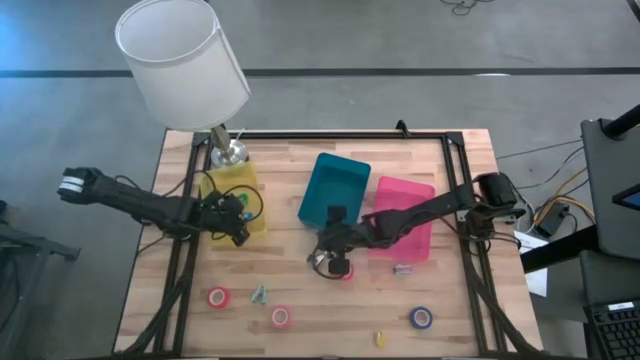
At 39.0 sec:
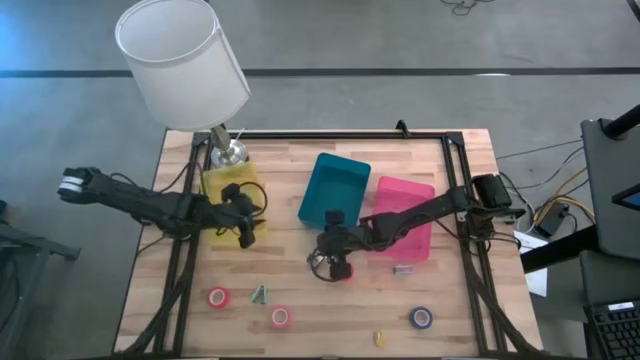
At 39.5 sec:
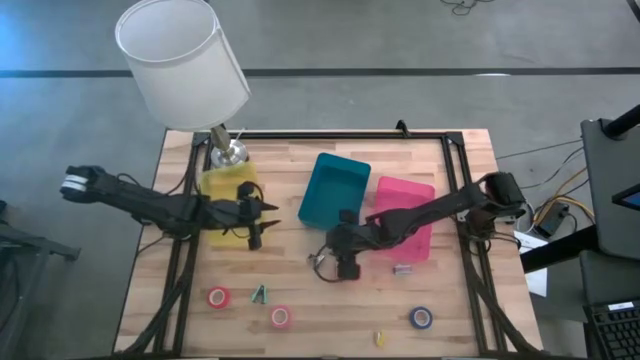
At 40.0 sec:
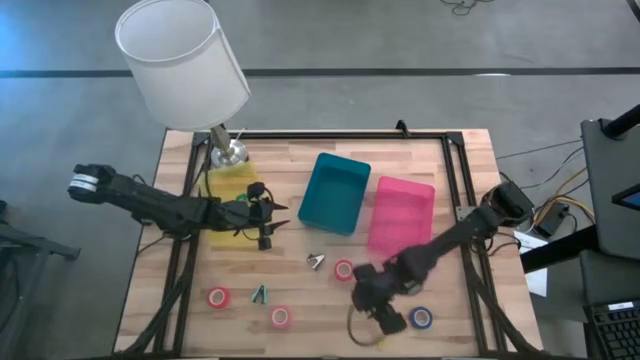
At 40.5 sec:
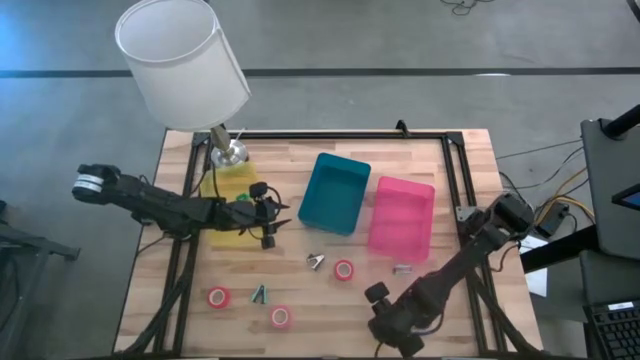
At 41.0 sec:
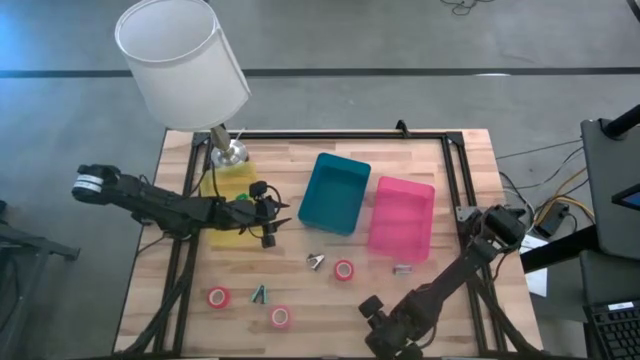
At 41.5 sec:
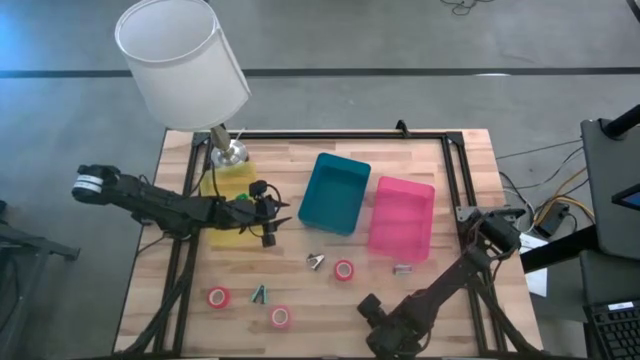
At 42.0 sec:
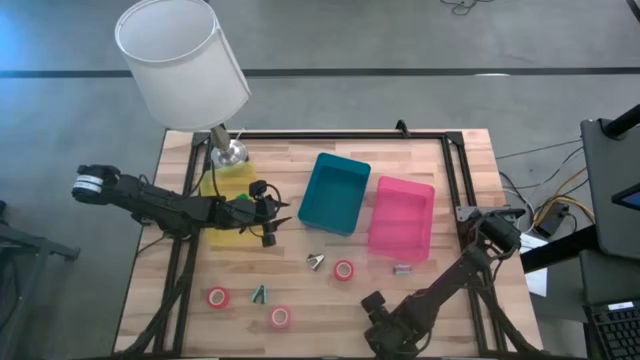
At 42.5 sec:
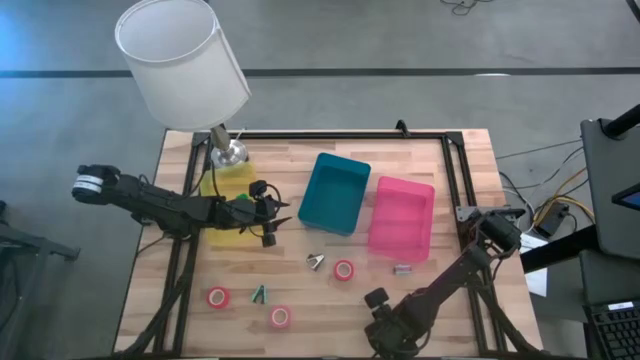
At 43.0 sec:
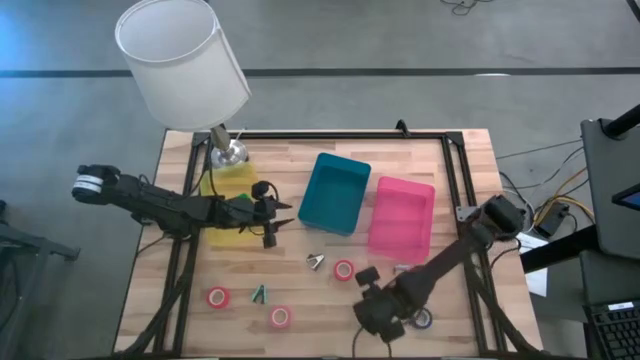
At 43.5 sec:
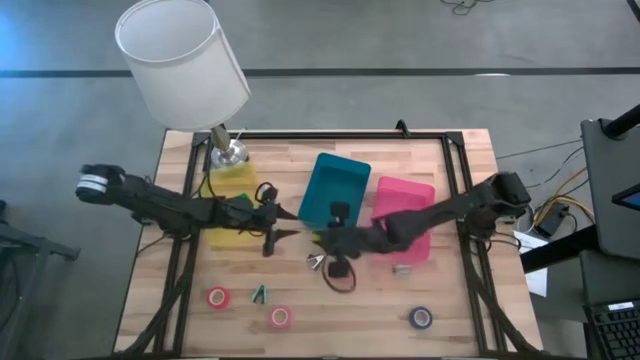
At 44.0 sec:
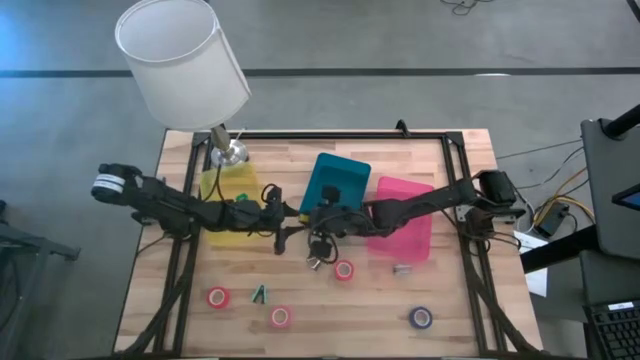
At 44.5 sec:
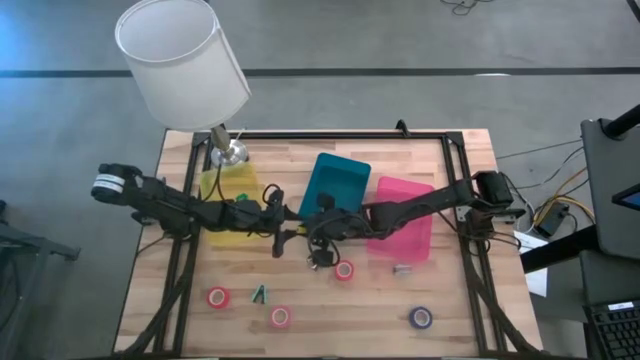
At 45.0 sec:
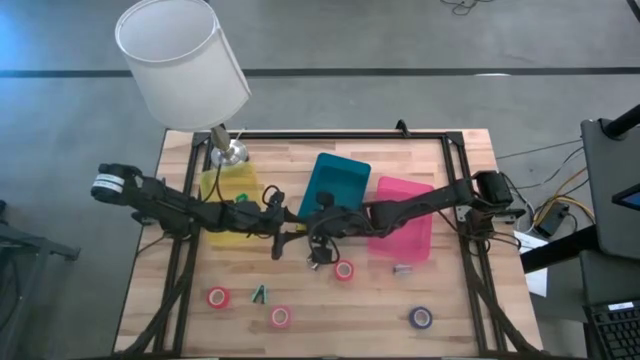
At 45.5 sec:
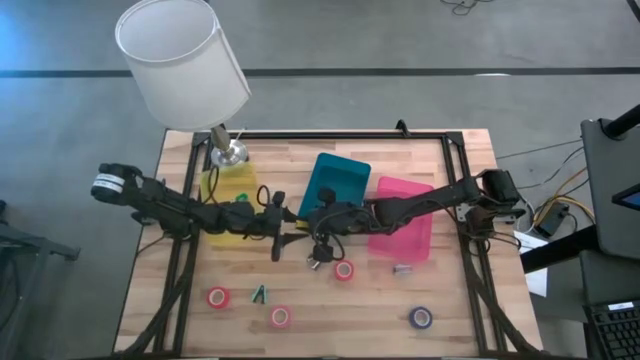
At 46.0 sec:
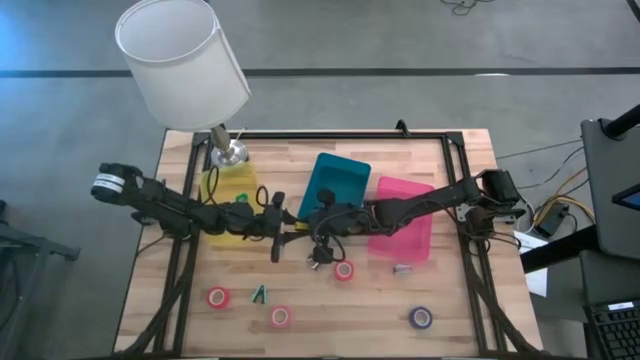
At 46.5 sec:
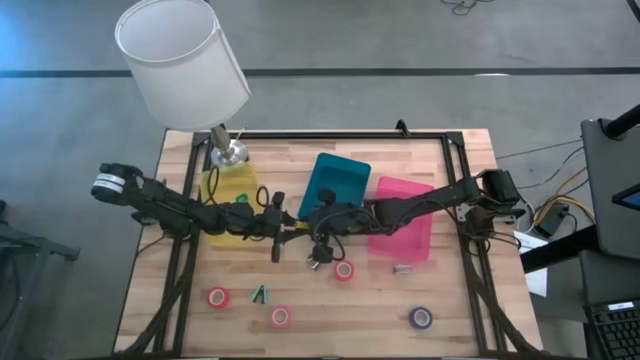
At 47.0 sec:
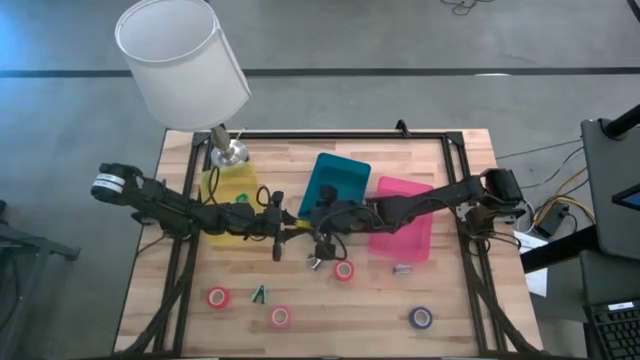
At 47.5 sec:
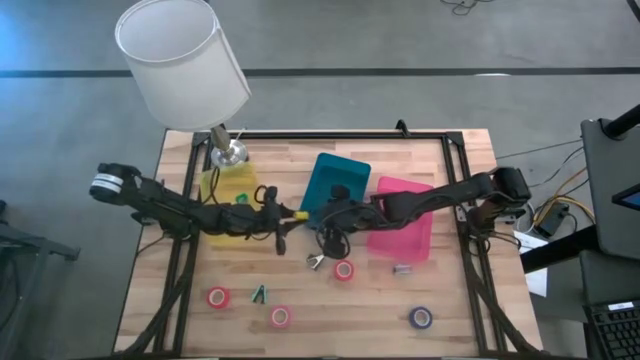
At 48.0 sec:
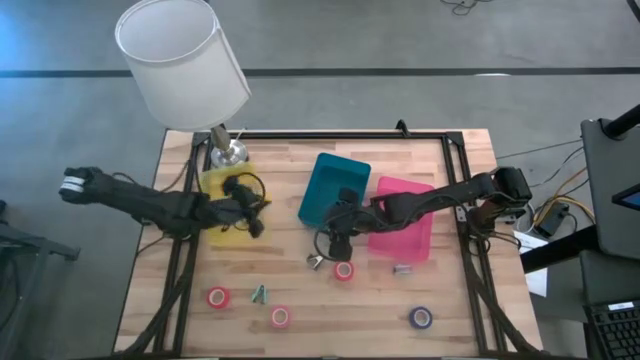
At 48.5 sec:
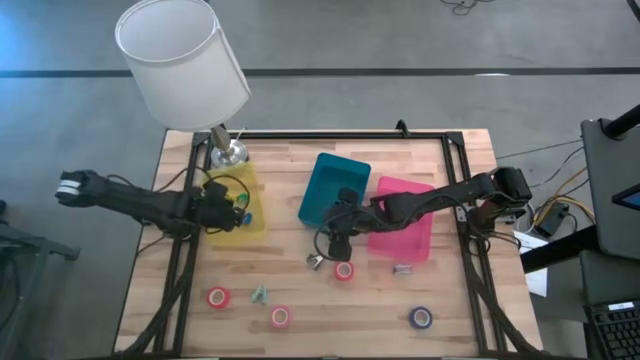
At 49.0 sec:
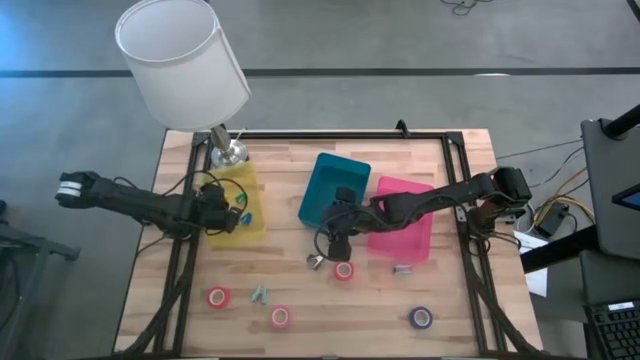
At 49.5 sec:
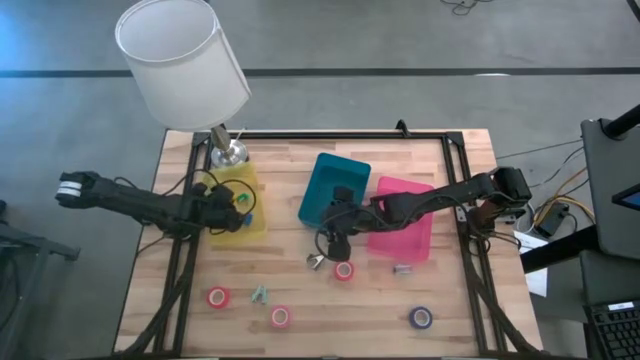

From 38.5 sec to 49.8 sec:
Task: Pick and place Stapler, Stapler remover, tape
Put the yellow stapler into the yellow bin

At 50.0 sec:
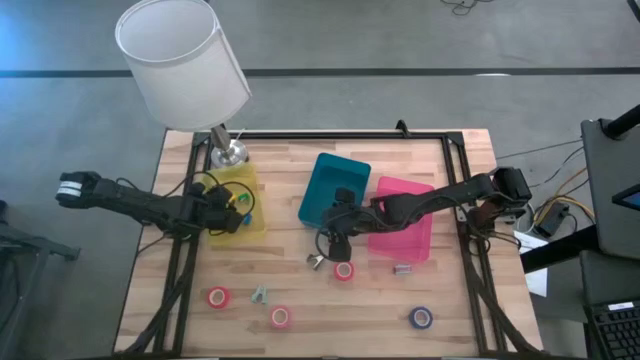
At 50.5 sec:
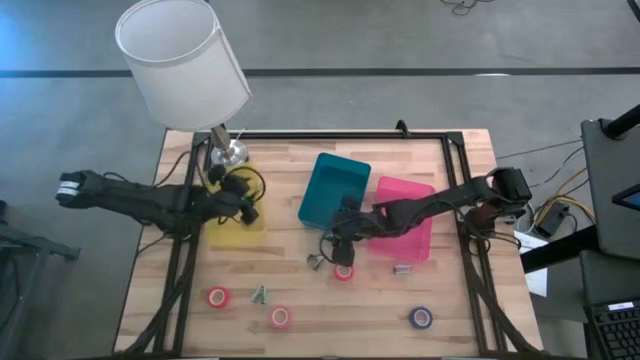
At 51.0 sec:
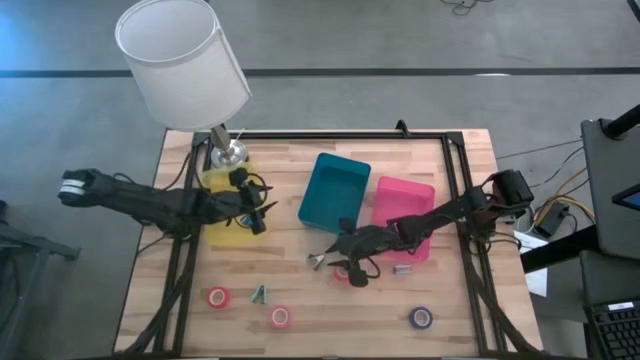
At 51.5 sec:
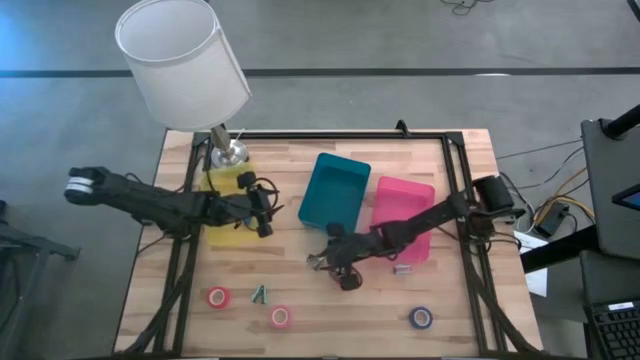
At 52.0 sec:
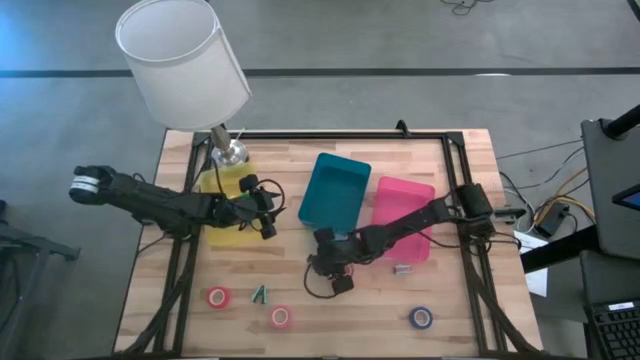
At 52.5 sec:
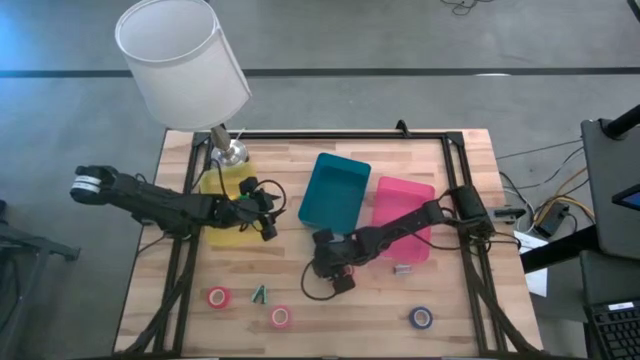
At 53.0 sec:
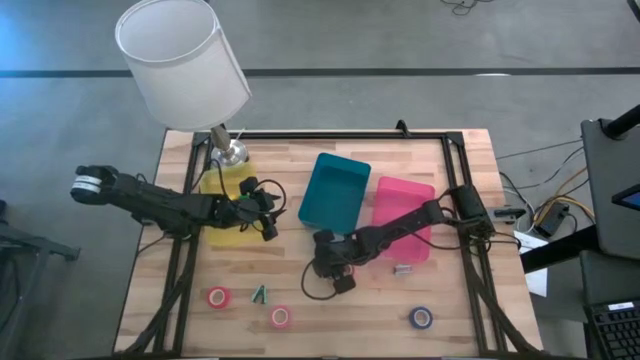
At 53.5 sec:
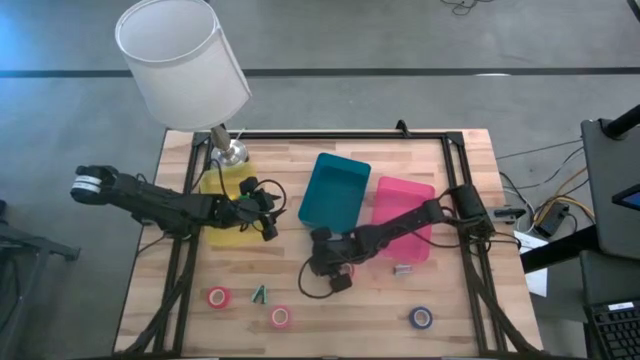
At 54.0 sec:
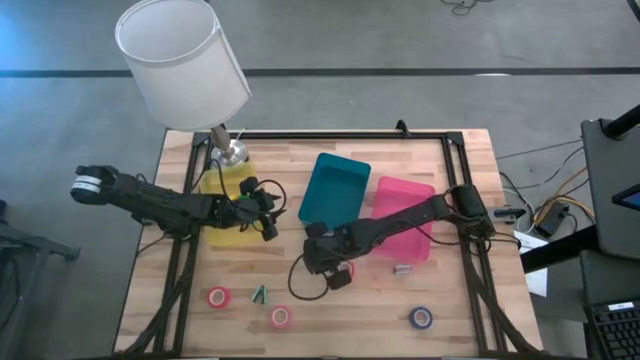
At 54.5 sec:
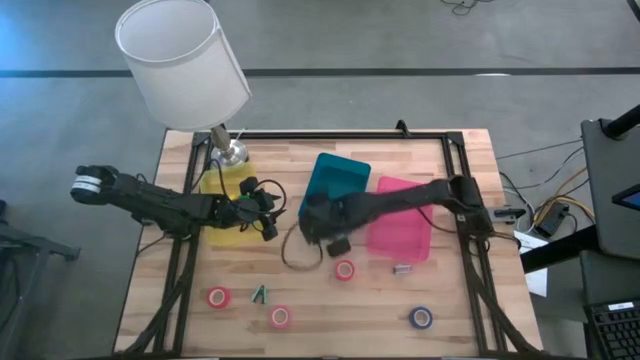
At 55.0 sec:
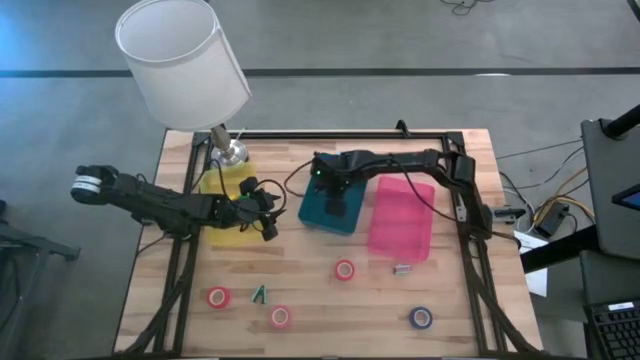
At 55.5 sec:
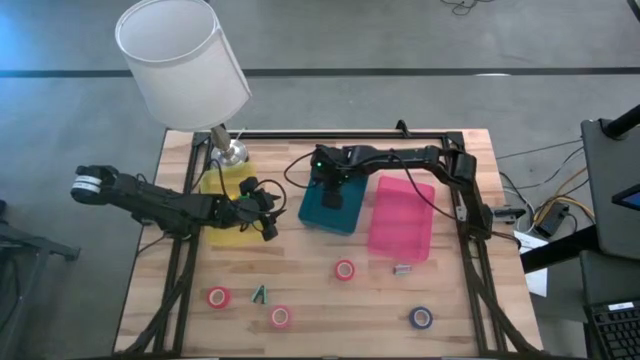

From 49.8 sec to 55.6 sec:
Put the black staple remover into the blue bin

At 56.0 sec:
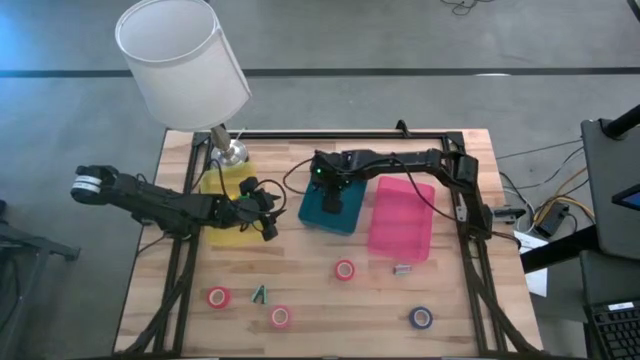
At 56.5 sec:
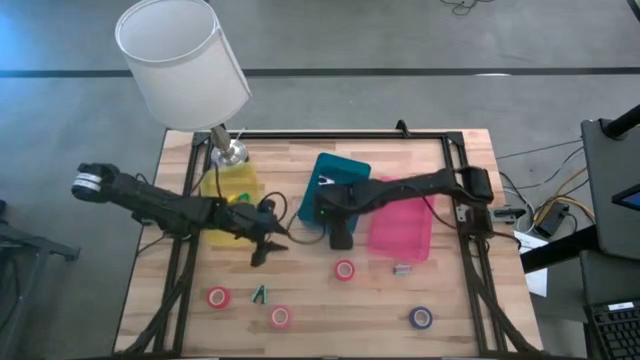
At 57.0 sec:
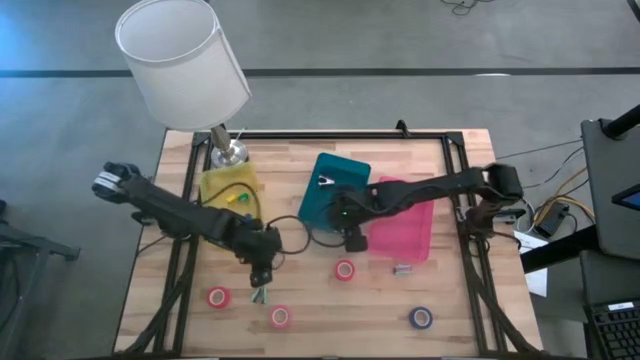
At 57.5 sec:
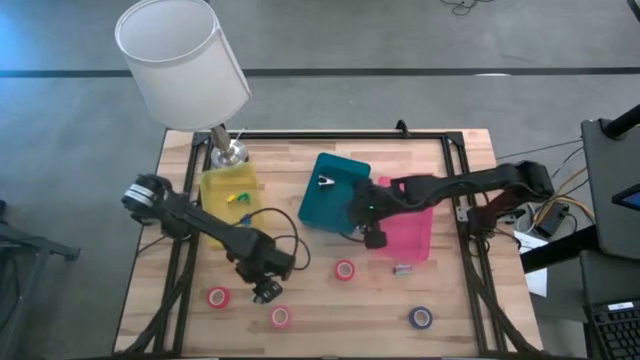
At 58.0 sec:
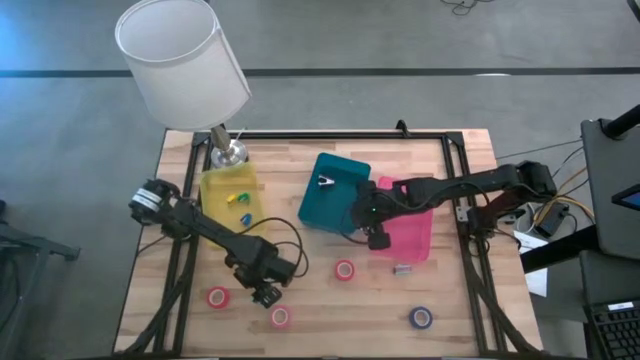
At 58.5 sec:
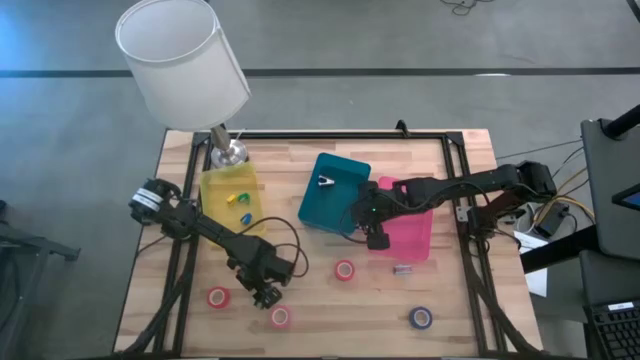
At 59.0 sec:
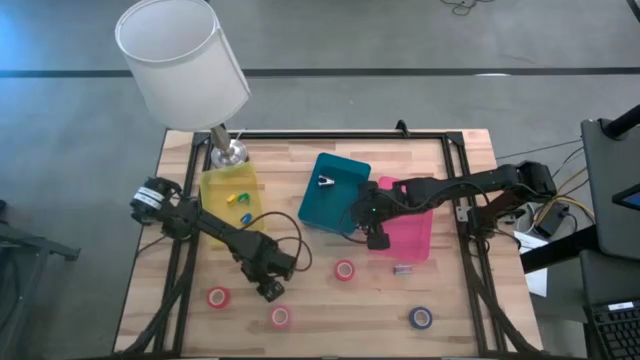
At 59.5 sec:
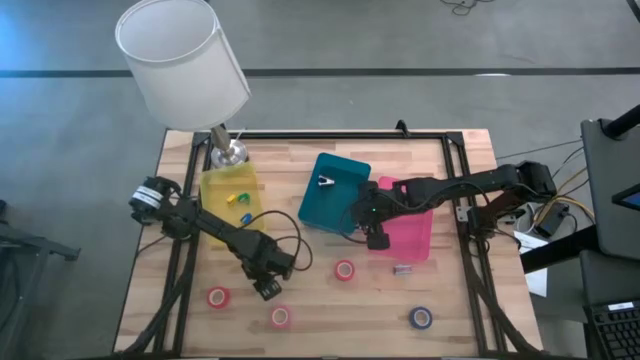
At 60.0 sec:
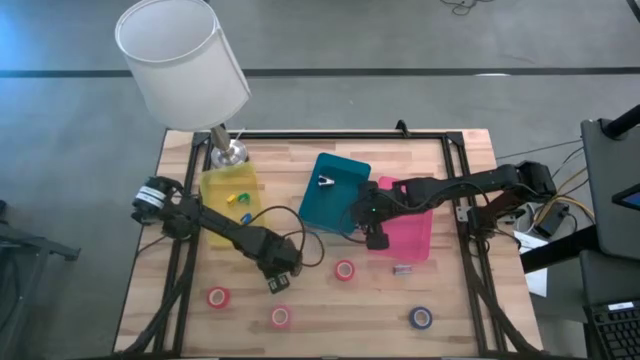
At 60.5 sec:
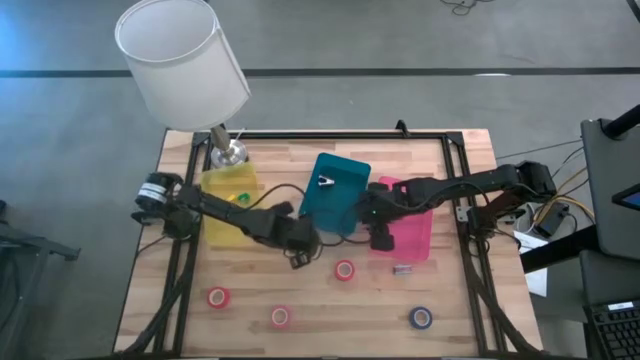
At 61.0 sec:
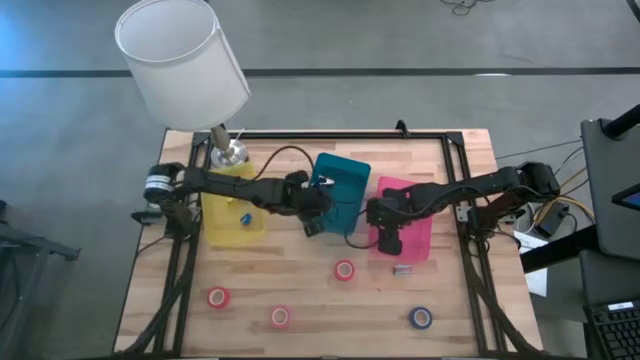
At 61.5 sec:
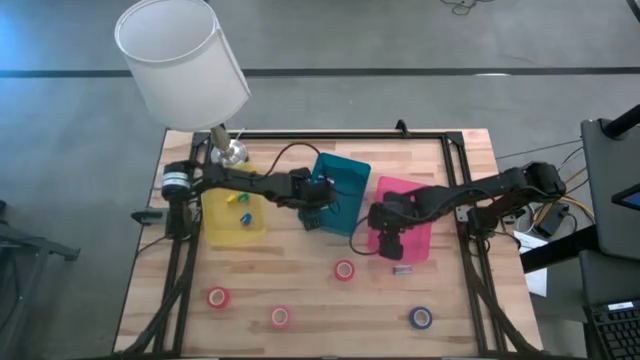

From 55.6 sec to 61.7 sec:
Put the left blue staple remover into the blue bin
